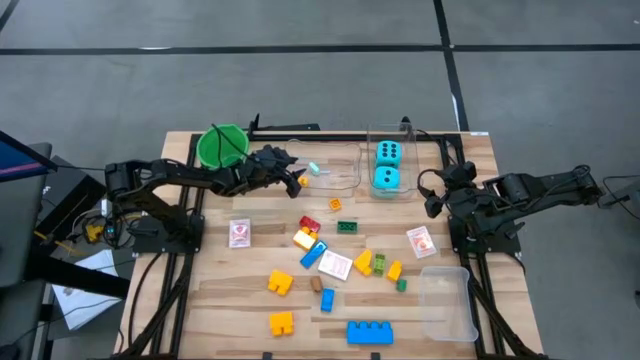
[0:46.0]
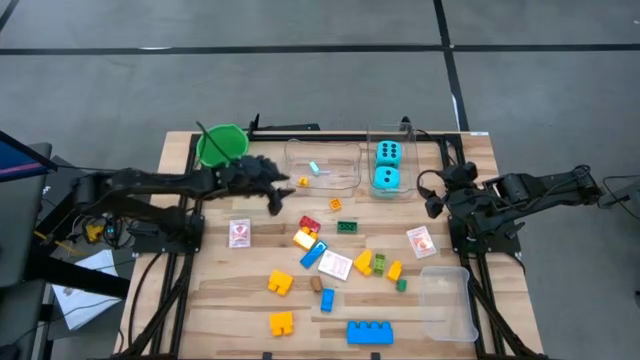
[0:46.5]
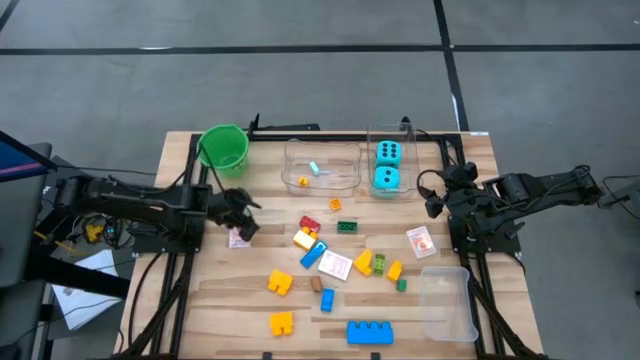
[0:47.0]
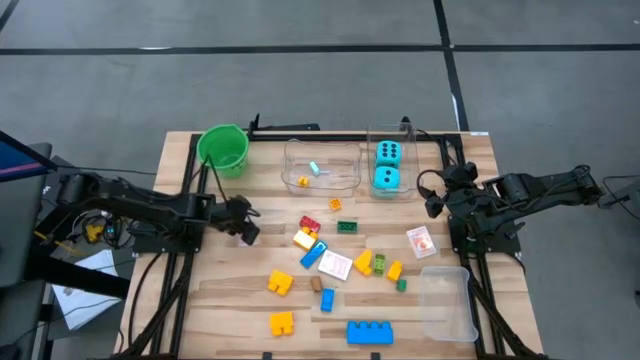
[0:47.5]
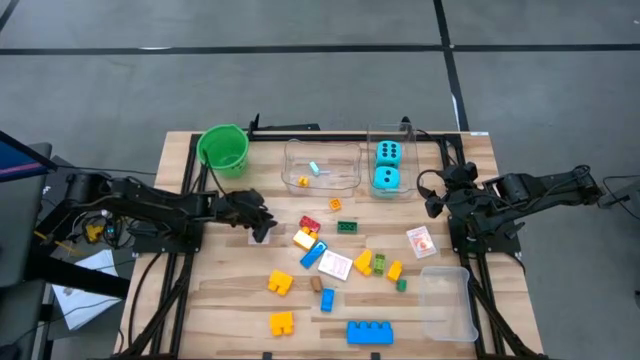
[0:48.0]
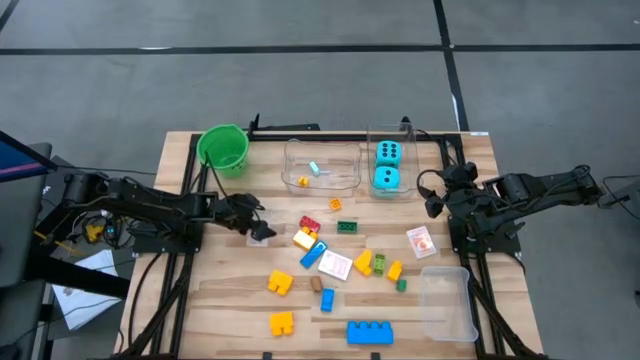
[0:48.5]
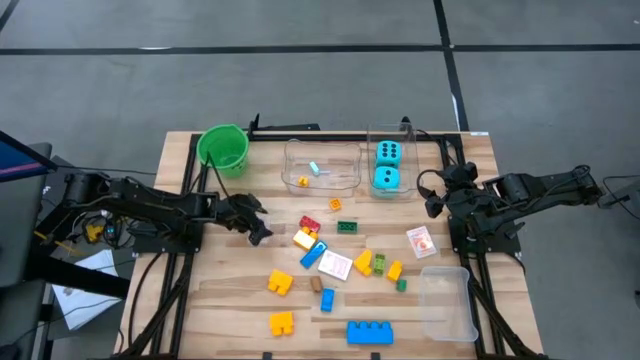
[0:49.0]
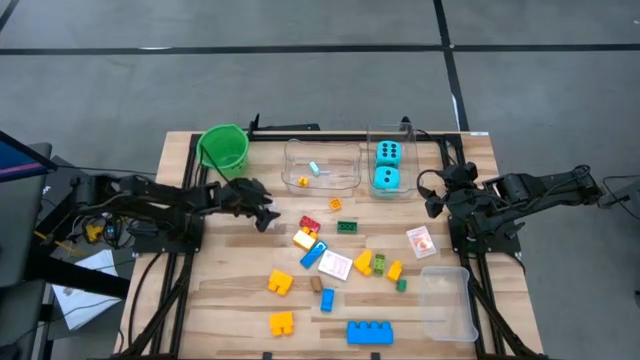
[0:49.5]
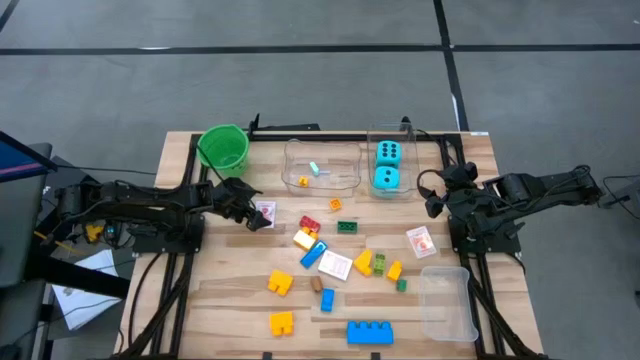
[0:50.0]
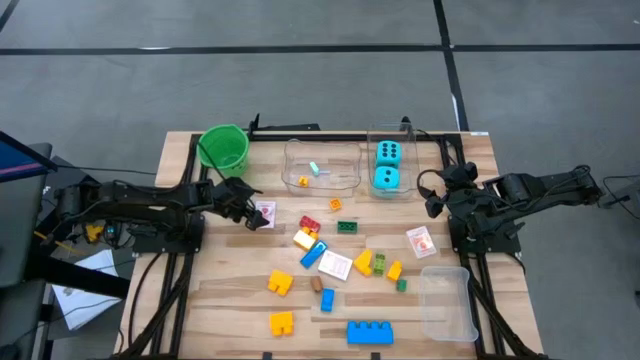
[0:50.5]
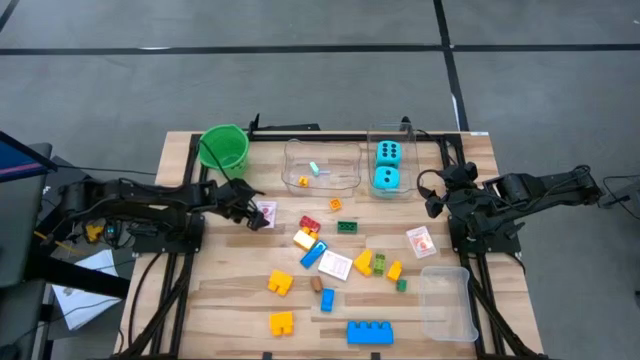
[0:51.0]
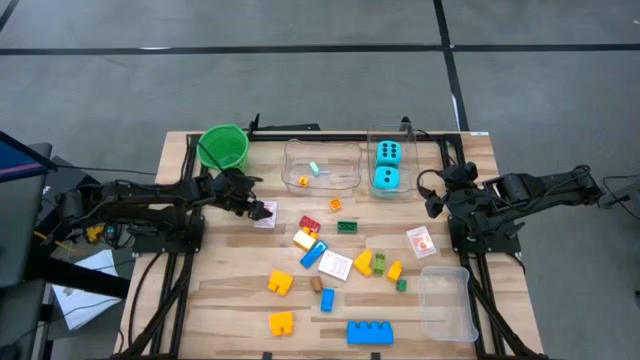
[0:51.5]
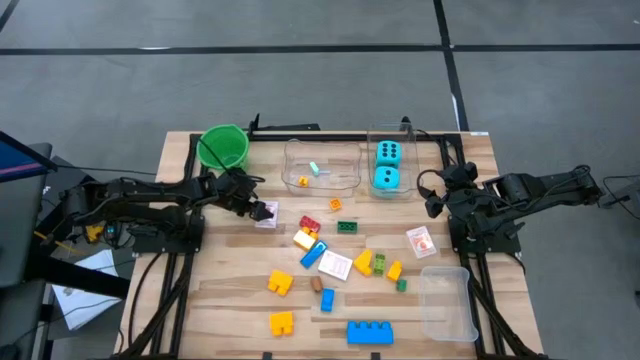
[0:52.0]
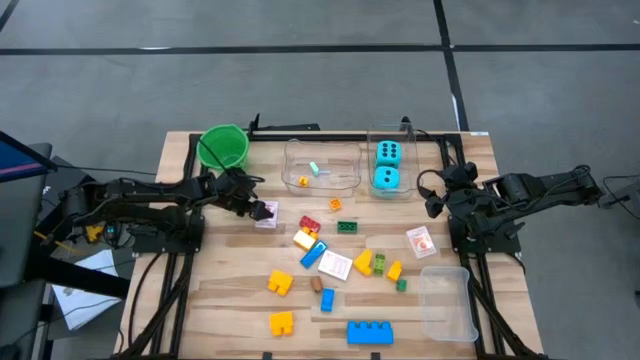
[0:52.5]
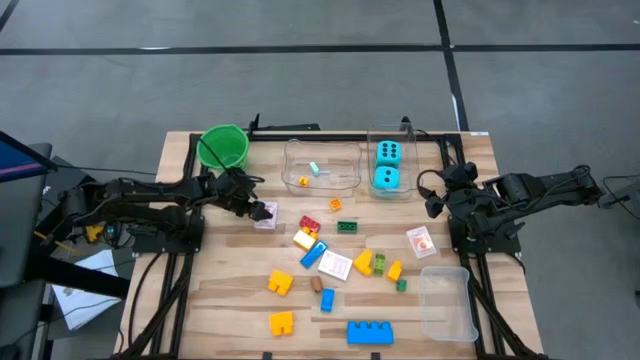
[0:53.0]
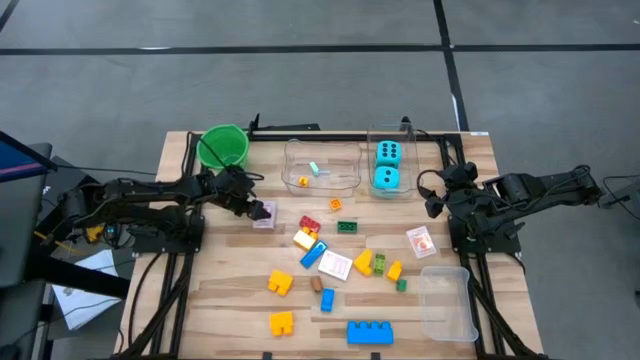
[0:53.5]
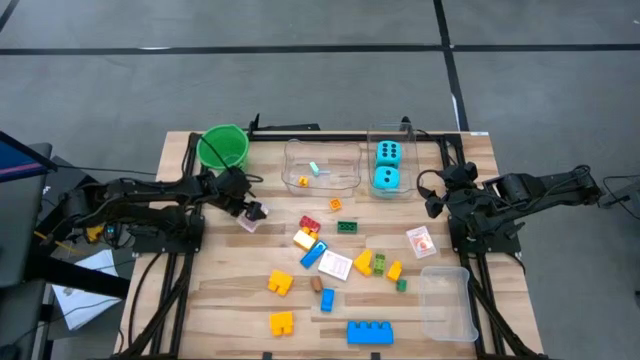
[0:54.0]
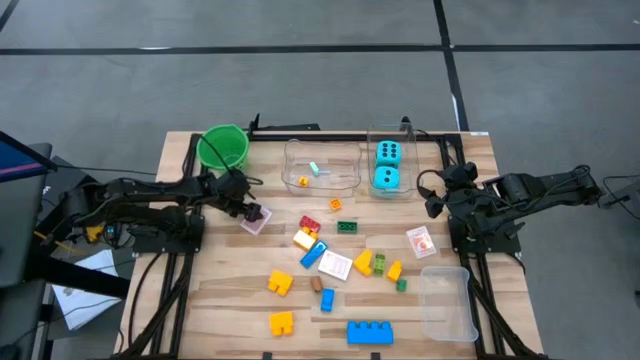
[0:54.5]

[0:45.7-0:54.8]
Task: Pick & Place Toys
Put the red deck of cards into the white bin

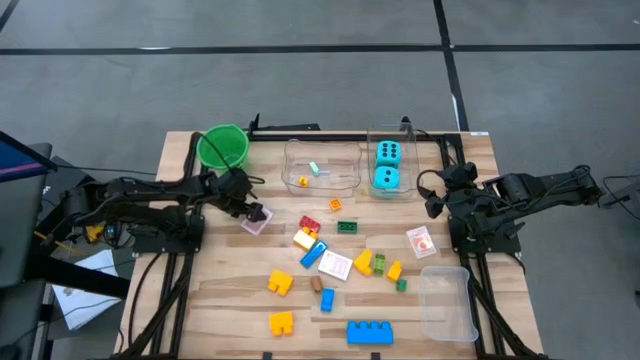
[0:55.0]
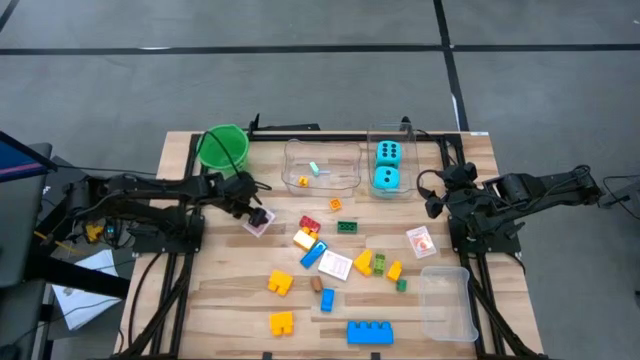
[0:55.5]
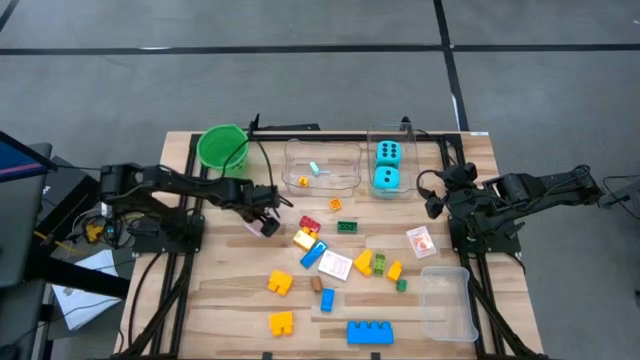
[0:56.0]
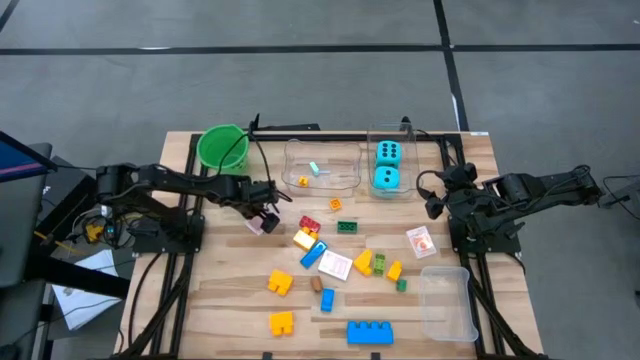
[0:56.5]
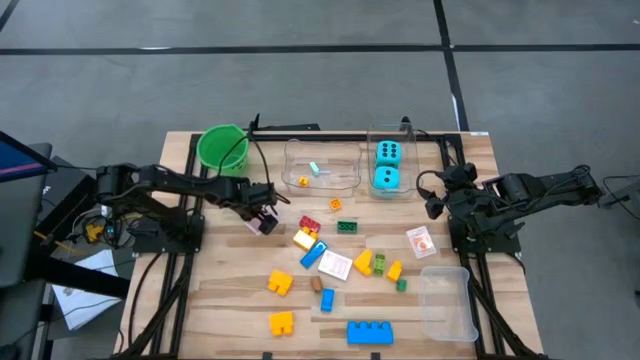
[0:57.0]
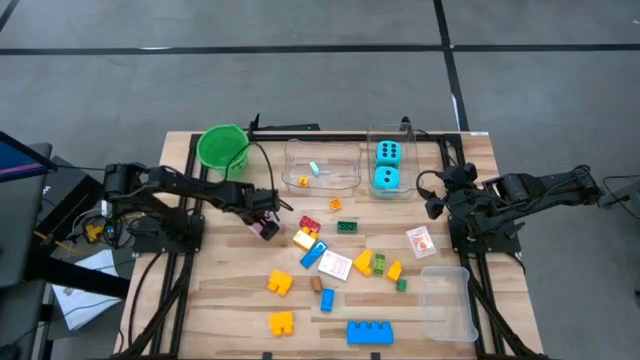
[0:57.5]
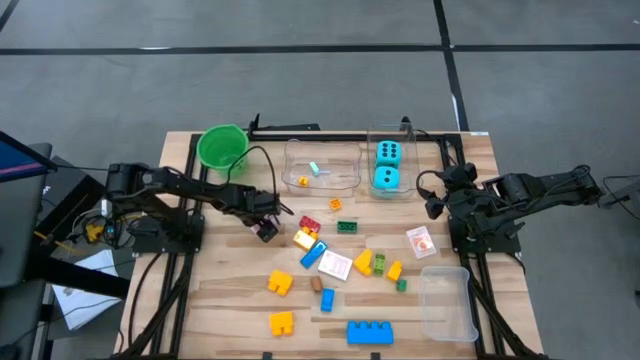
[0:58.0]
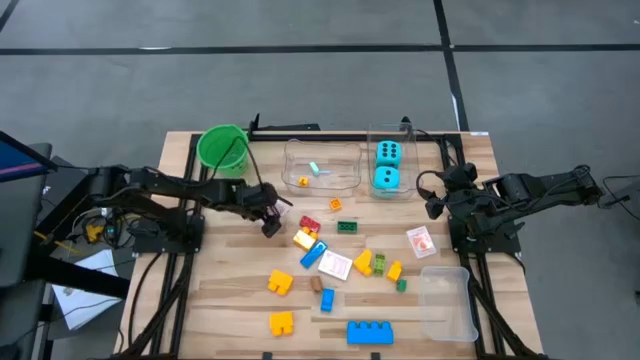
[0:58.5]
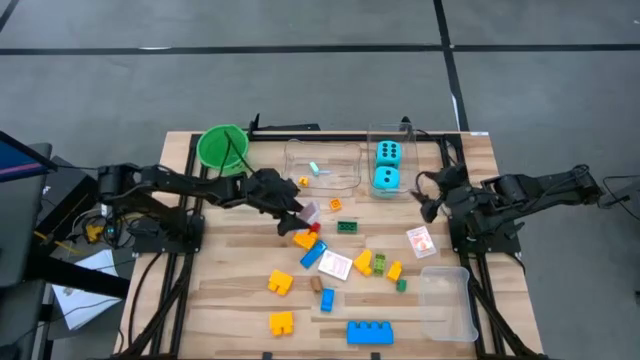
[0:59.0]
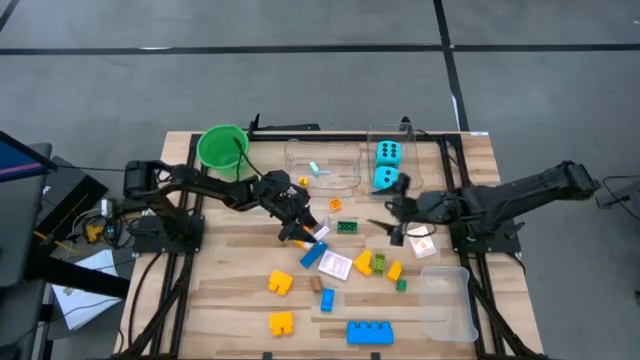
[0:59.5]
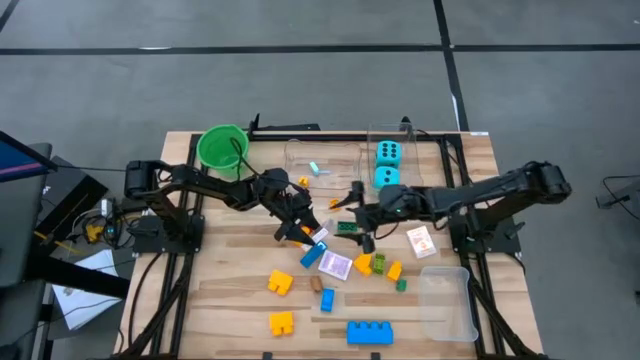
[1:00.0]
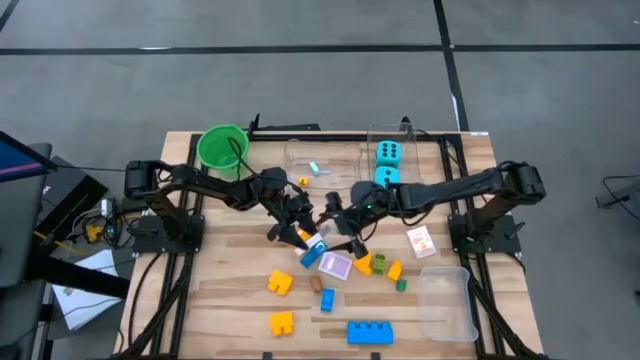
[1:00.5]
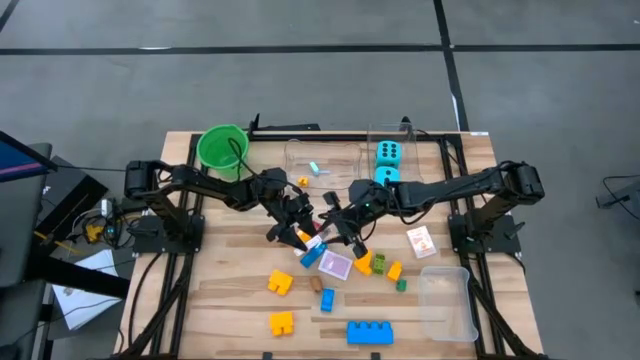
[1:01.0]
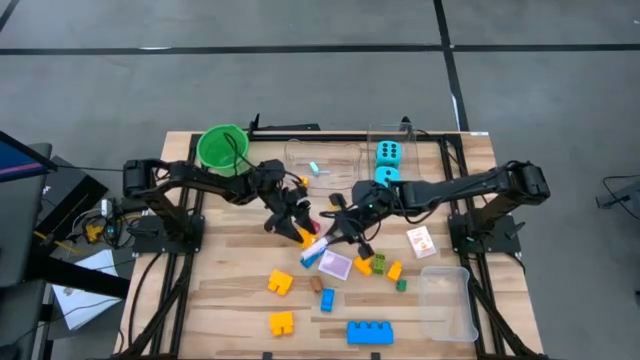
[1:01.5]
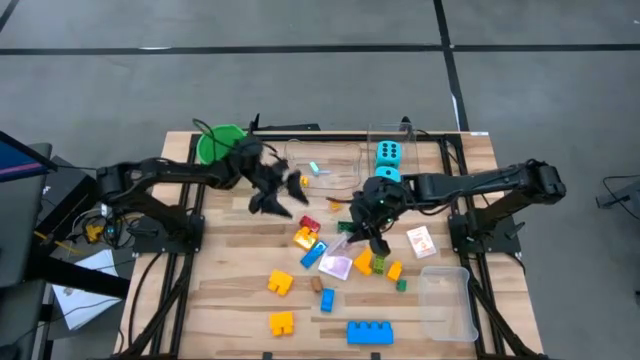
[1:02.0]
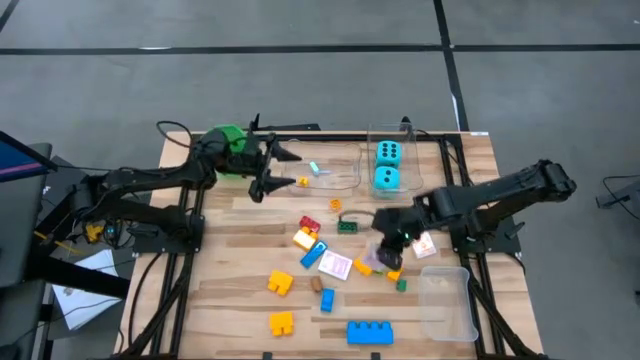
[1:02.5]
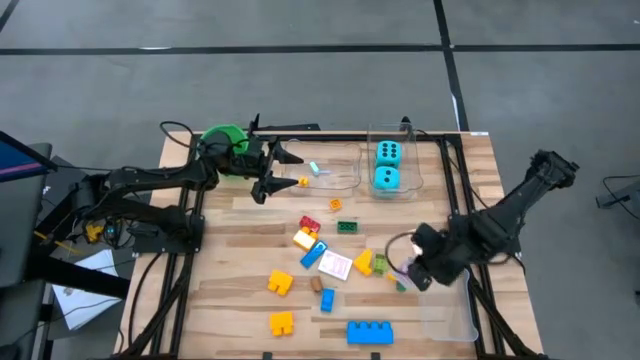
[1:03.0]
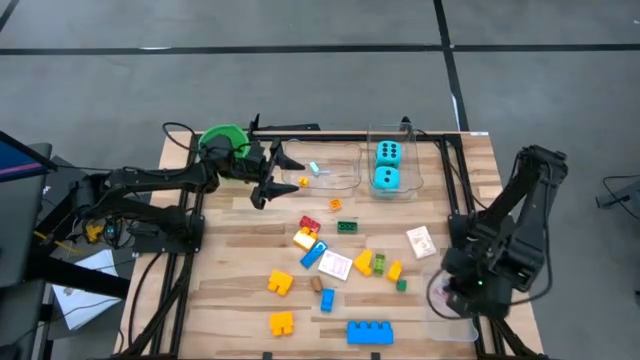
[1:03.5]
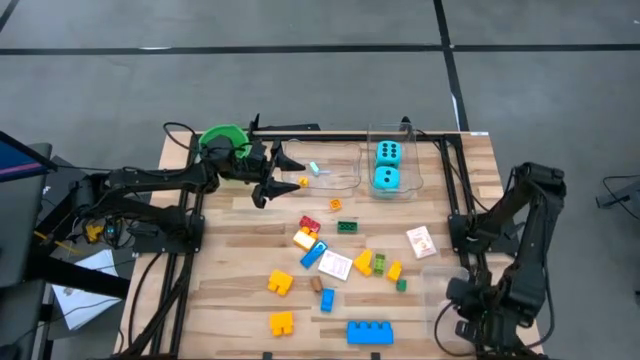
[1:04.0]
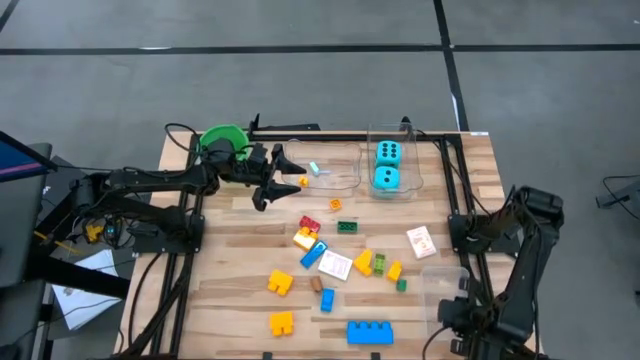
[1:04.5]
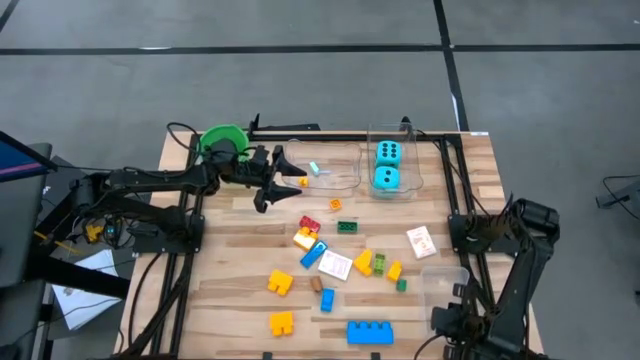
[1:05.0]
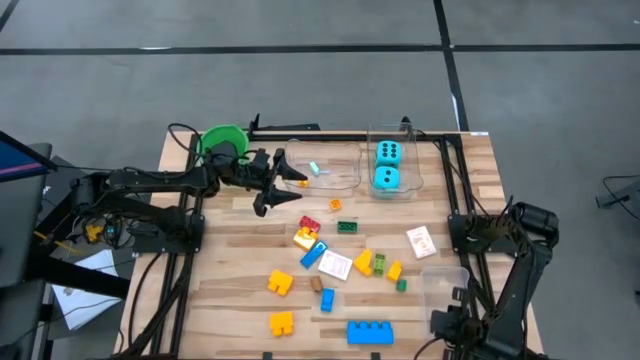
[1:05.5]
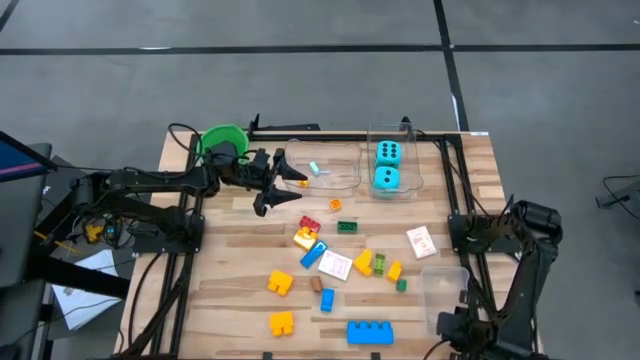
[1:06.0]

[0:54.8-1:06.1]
Put the red deck of cards into the white bin
